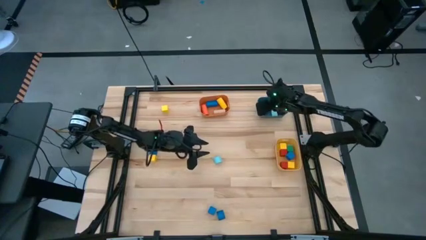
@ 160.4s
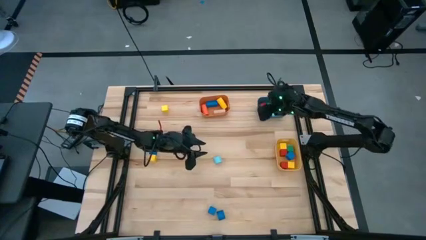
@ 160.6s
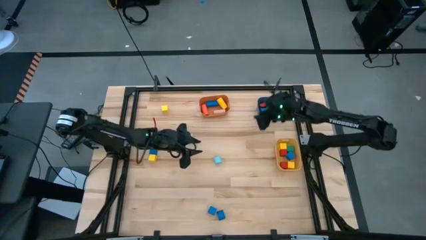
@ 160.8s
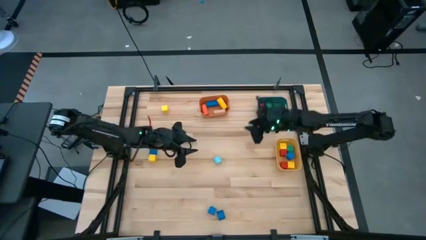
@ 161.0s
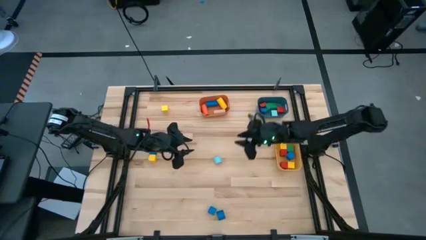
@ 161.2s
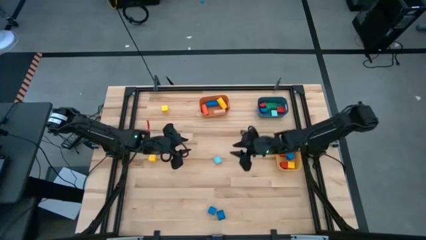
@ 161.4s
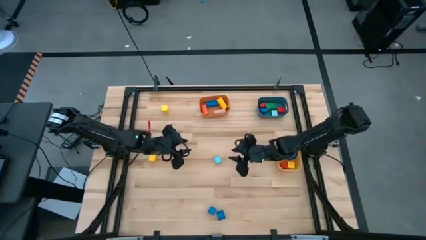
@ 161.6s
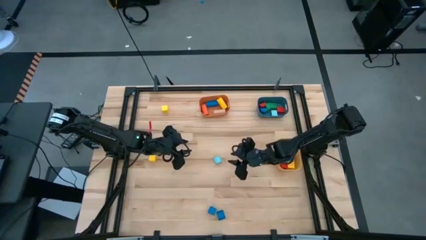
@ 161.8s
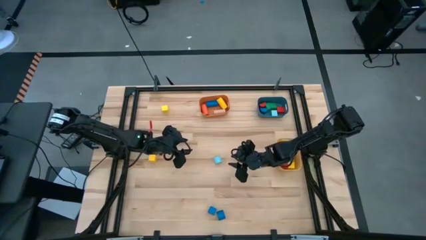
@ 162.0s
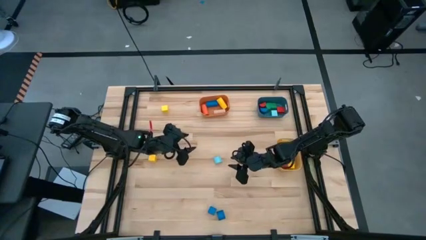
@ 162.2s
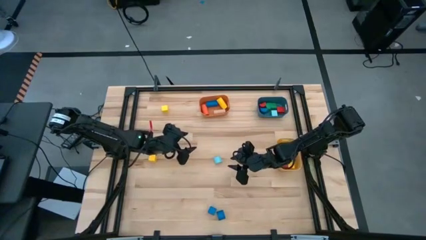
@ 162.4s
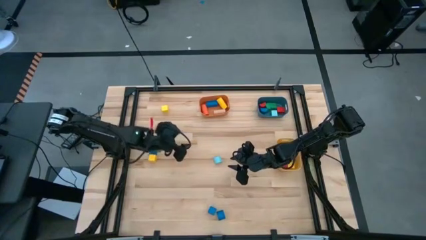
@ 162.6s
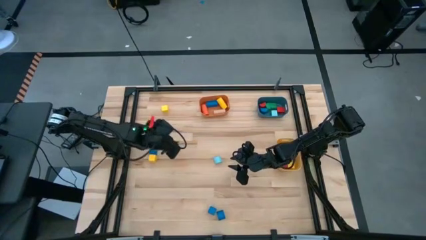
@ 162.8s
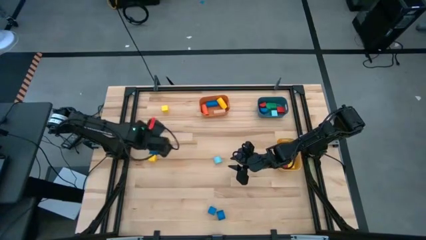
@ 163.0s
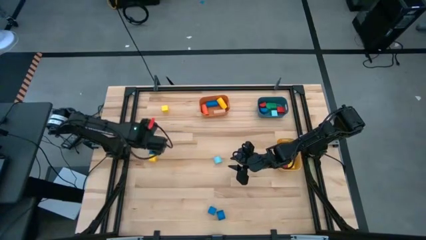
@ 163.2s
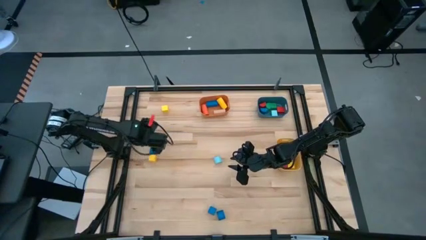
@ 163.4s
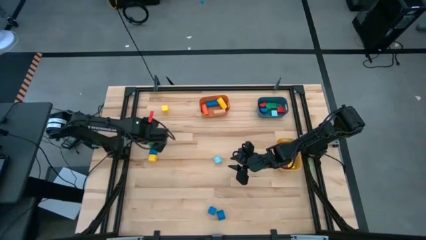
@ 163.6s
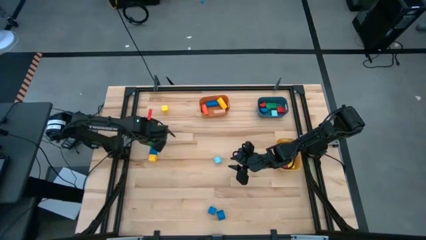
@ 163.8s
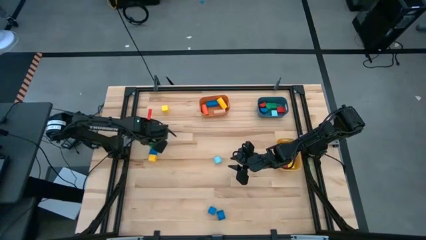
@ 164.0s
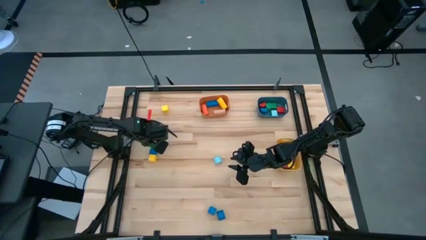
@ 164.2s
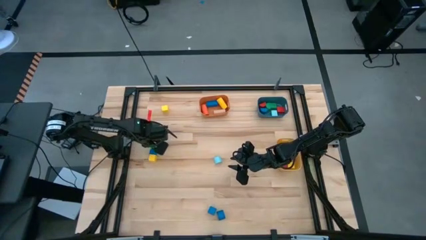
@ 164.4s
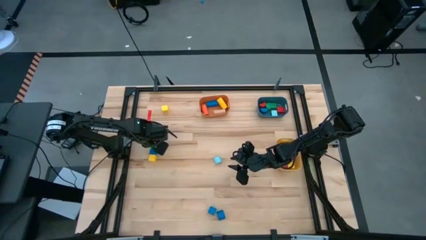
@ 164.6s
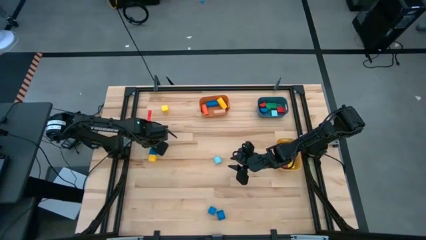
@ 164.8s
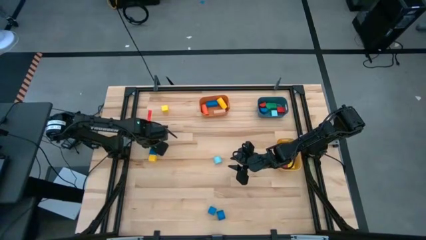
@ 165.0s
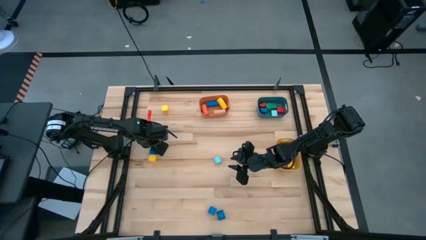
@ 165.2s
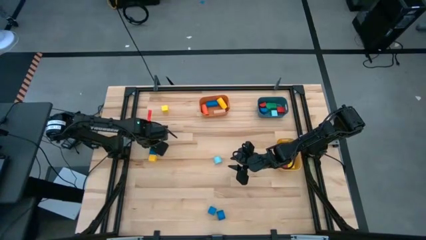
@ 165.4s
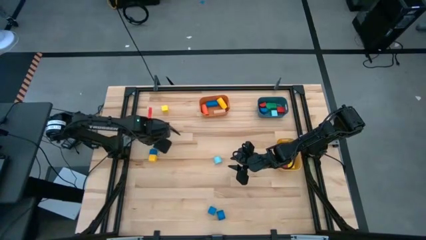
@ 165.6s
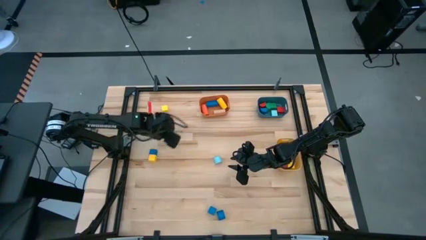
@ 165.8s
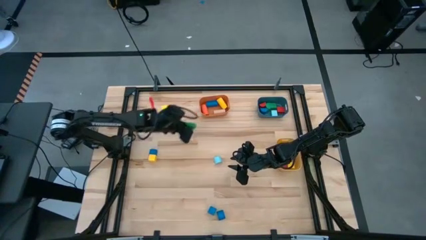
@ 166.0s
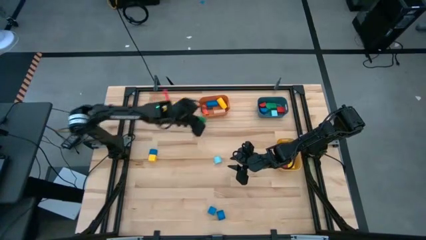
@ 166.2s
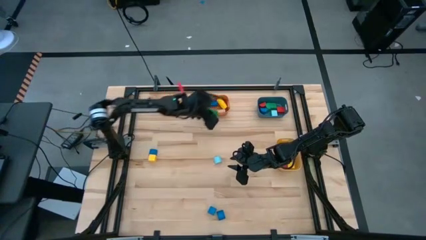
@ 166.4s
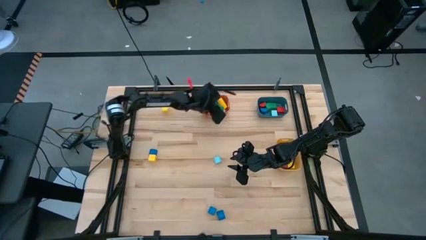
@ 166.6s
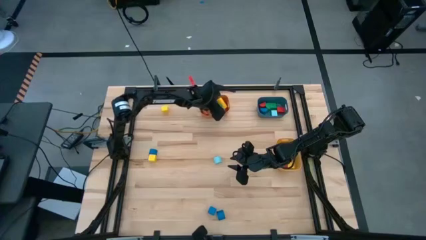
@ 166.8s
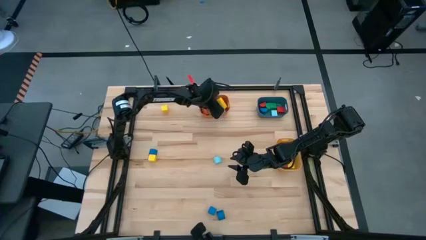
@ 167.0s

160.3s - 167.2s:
Task: Sort blocks by size
Put the green cylinder block into the orange bin

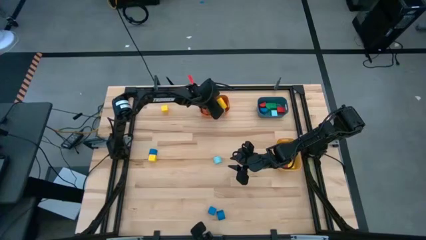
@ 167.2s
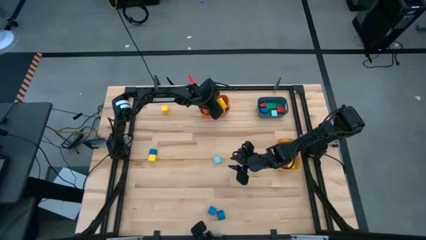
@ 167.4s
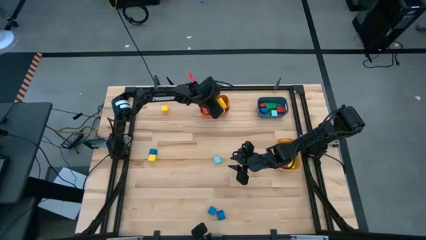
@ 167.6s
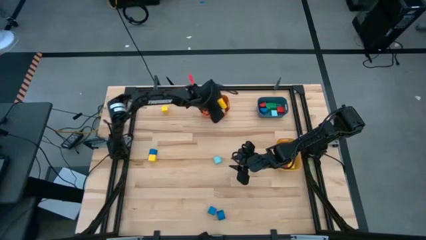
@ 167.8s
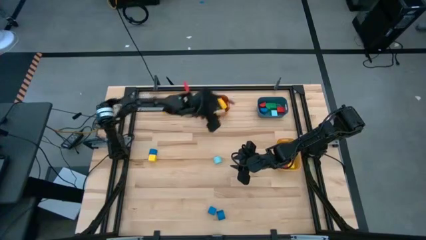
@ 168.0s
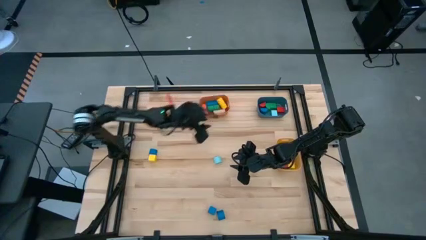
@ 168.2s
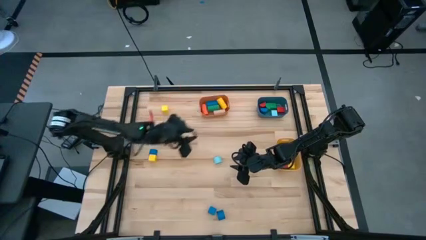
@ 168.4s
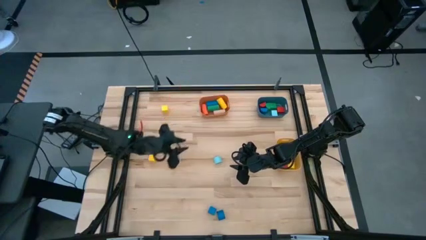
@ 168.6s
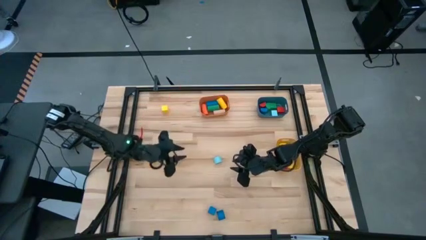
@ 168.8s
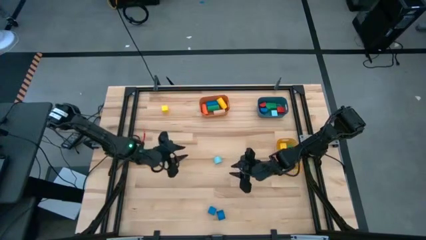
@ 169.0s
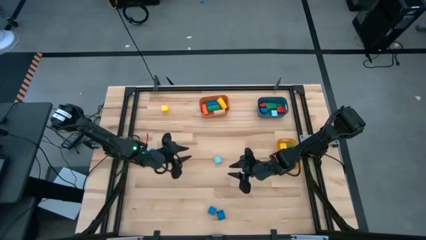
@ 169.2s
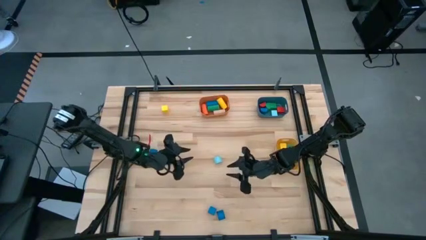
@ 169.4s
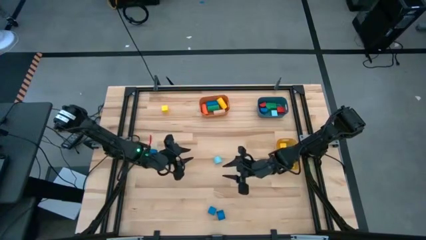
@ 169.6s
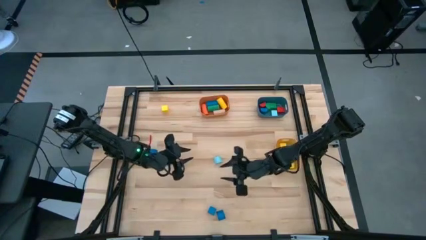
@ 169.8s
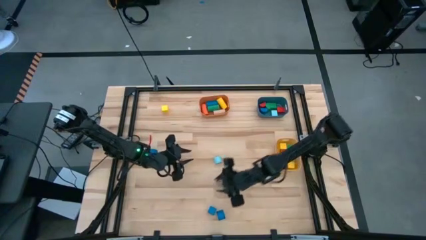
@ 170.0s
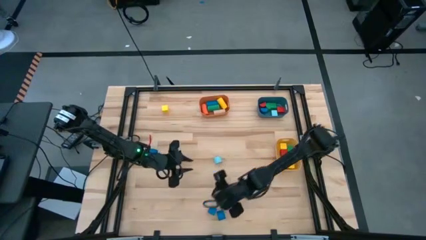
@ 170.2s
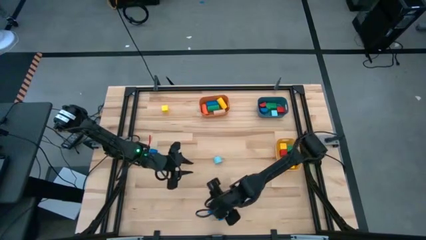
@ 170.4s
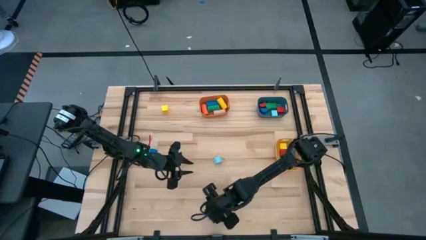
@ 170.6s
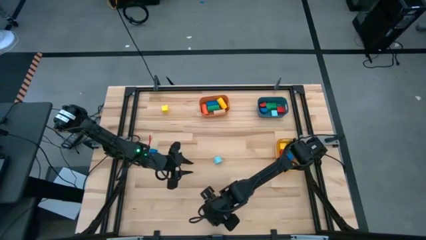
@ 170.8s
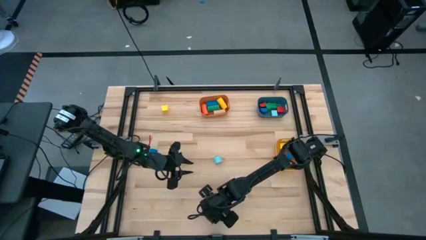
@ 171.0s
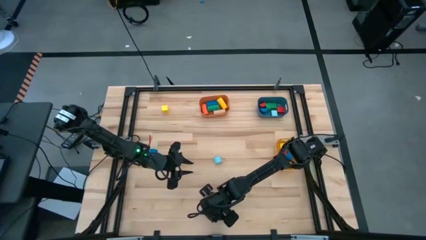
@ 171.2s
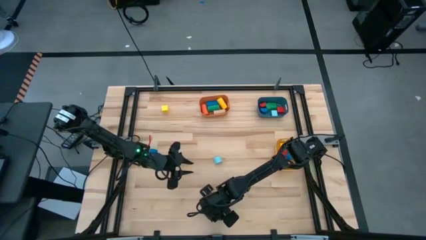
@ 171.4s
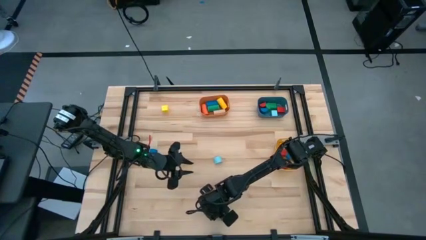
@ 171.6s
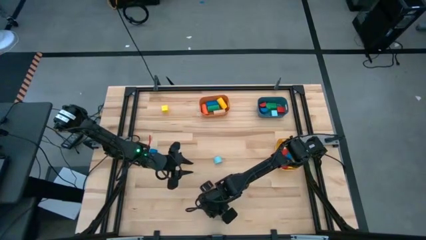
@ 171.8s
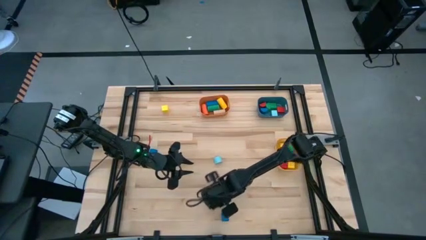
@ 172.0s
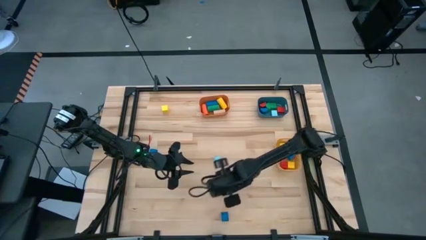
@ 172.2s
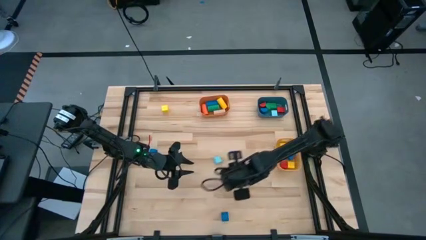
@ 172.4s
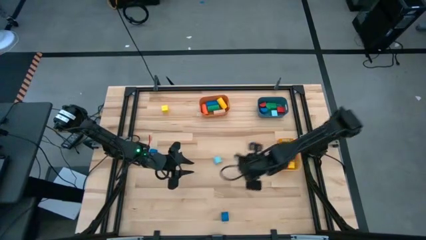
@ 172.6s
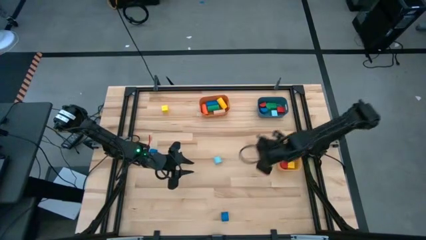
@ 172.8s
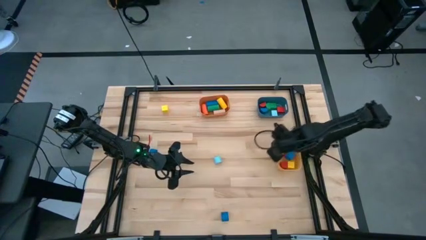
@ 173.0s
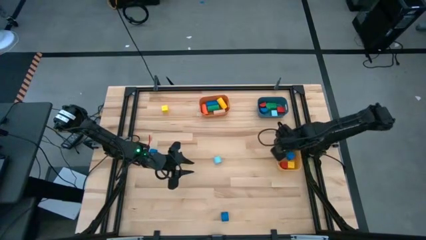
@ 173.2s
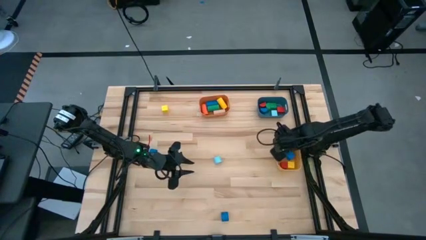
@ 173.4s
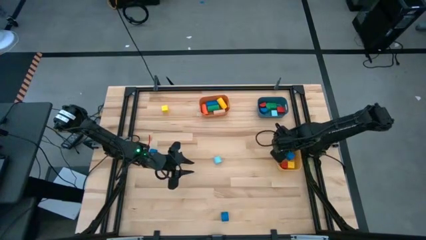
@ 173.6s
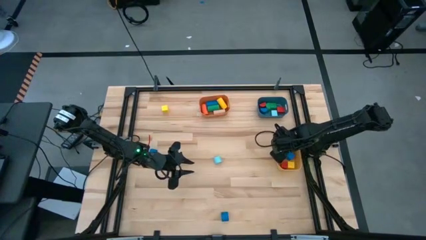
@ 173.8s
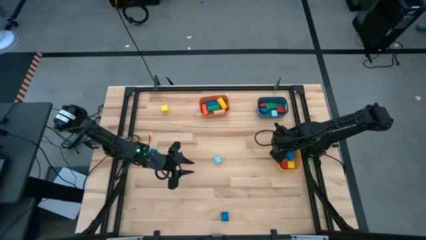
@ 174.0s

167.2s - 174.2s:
Put the blue cube block into the yellow bin
